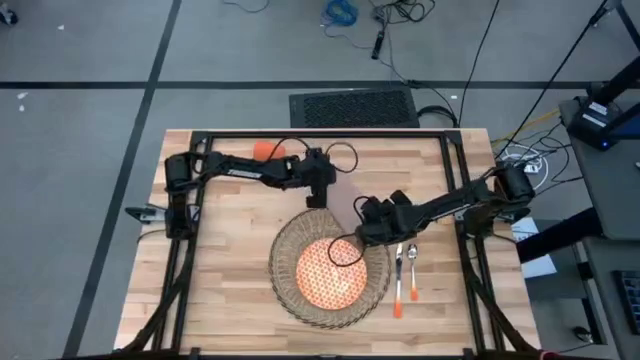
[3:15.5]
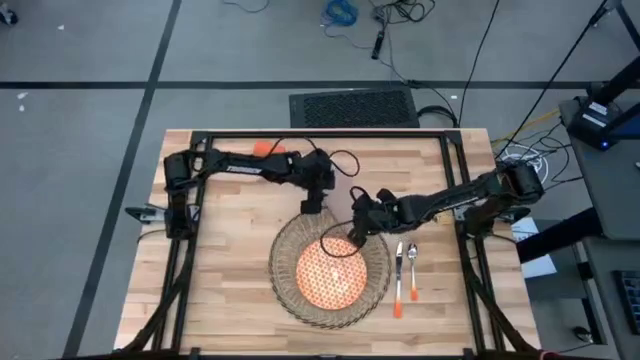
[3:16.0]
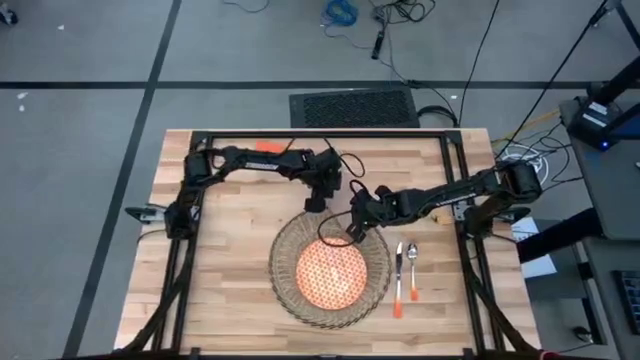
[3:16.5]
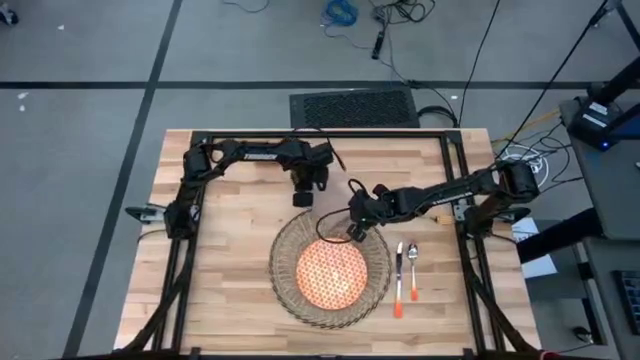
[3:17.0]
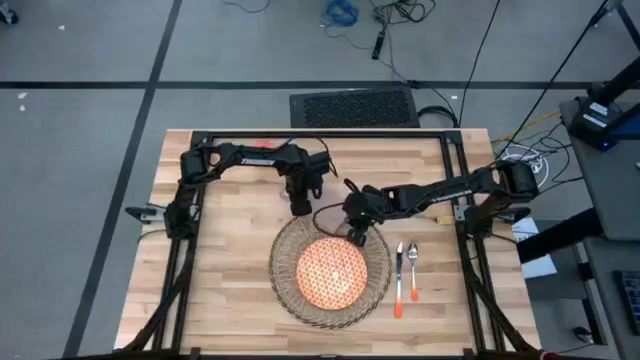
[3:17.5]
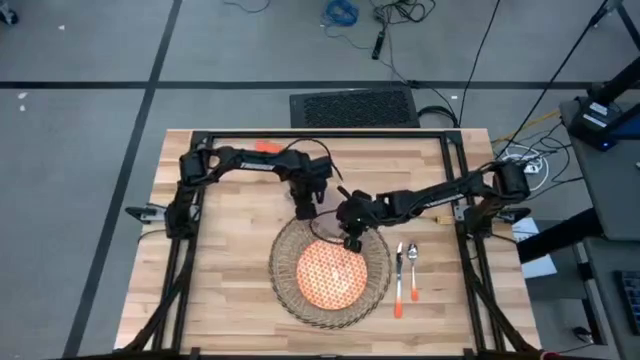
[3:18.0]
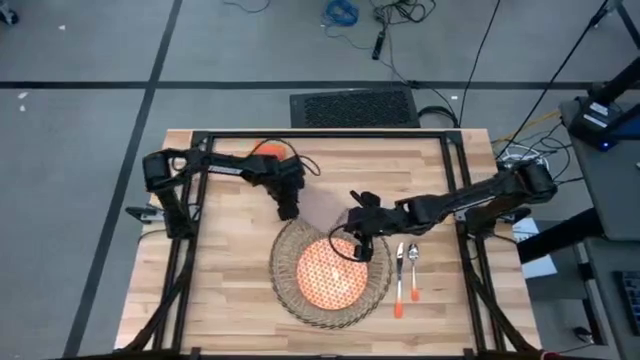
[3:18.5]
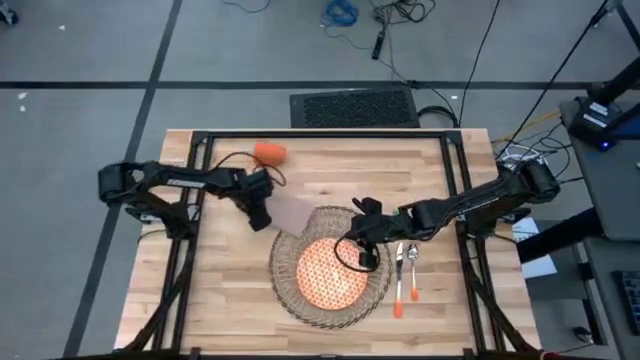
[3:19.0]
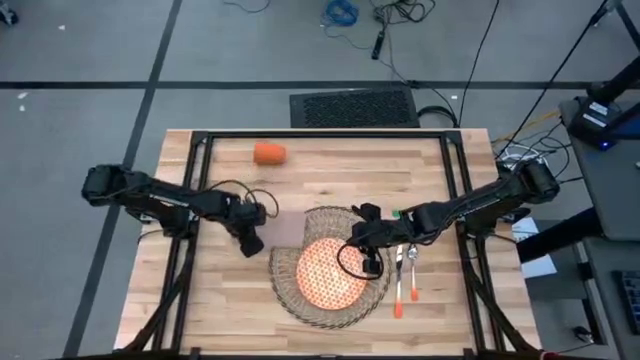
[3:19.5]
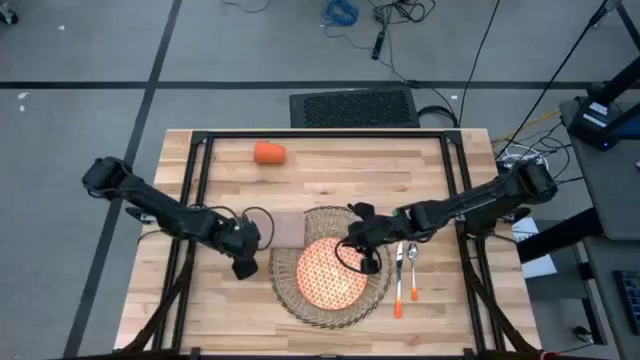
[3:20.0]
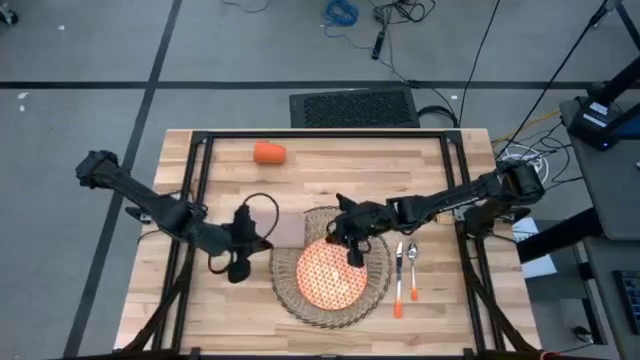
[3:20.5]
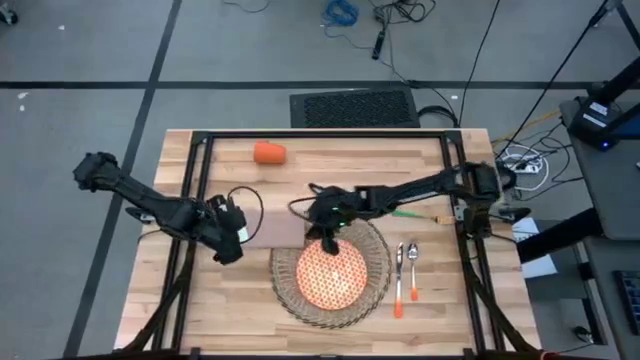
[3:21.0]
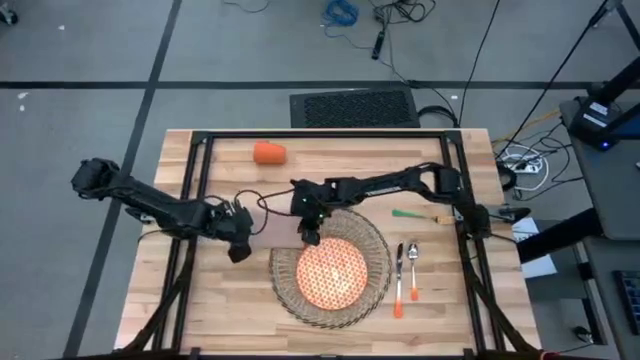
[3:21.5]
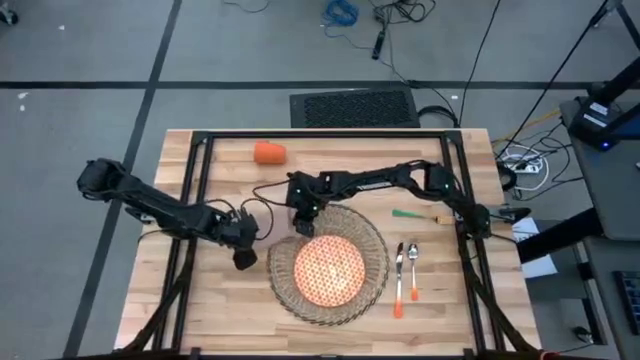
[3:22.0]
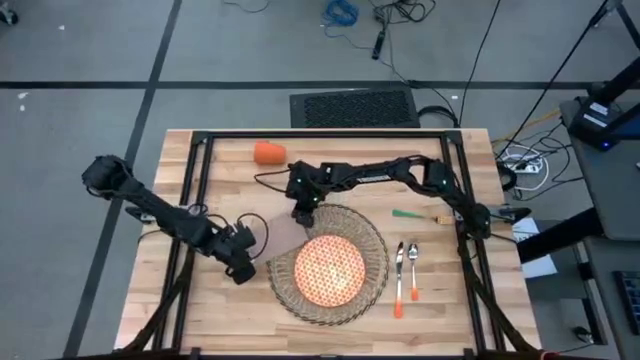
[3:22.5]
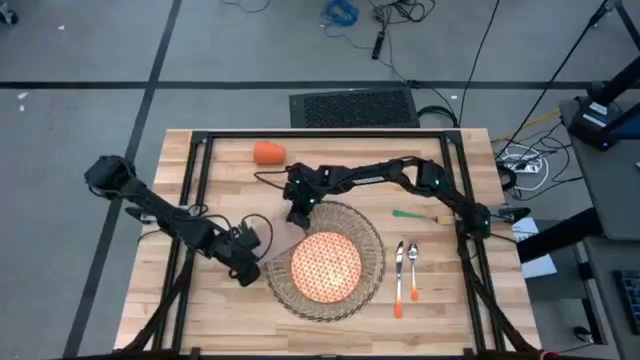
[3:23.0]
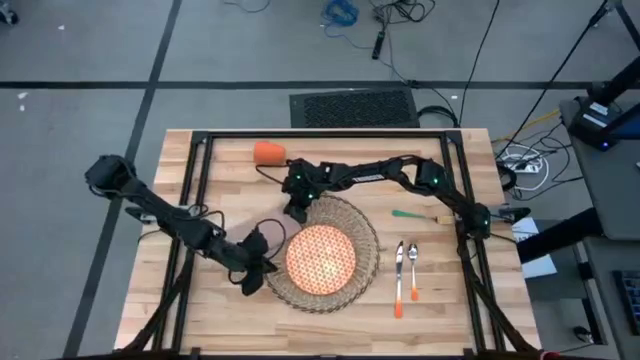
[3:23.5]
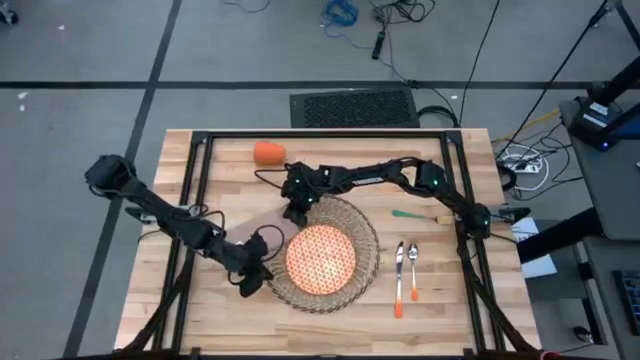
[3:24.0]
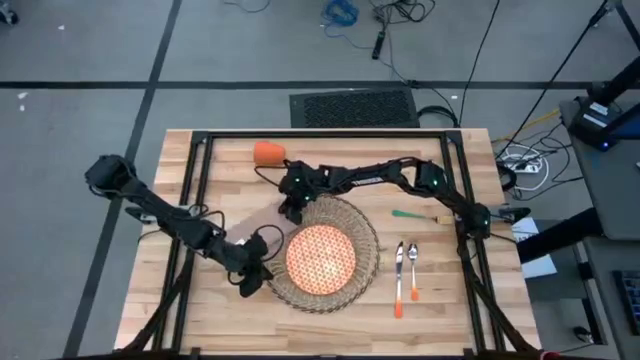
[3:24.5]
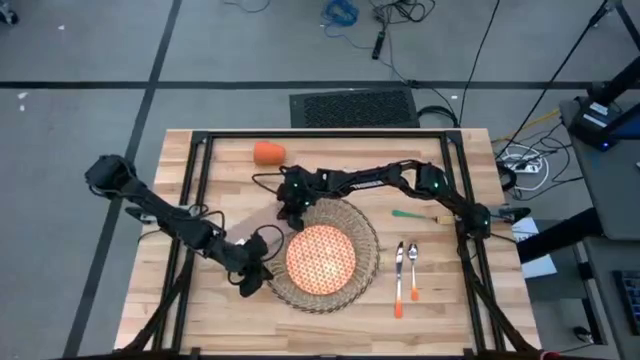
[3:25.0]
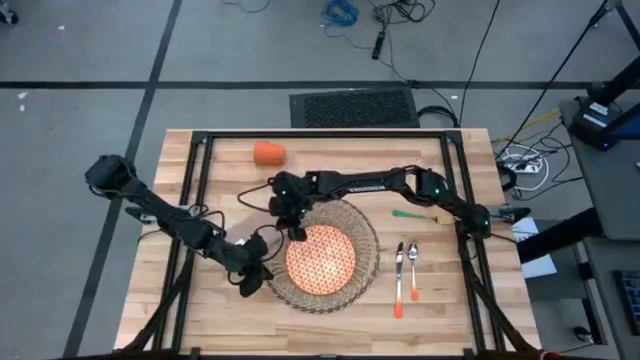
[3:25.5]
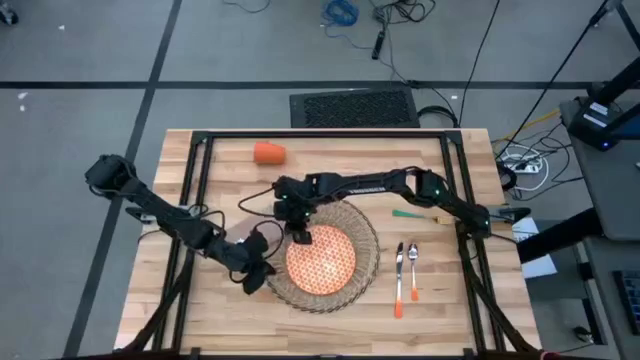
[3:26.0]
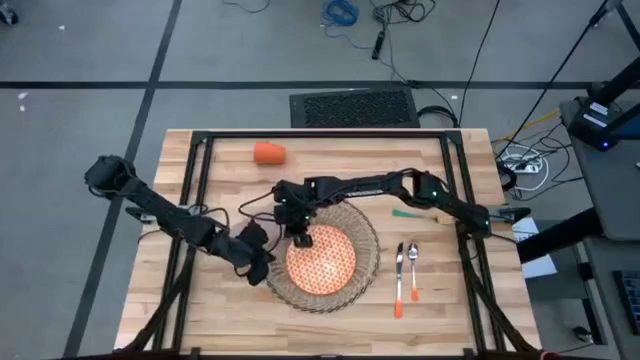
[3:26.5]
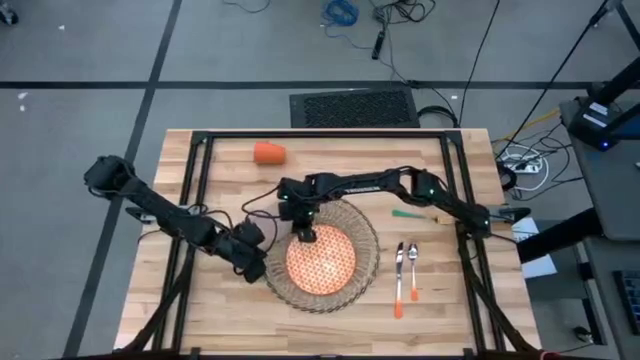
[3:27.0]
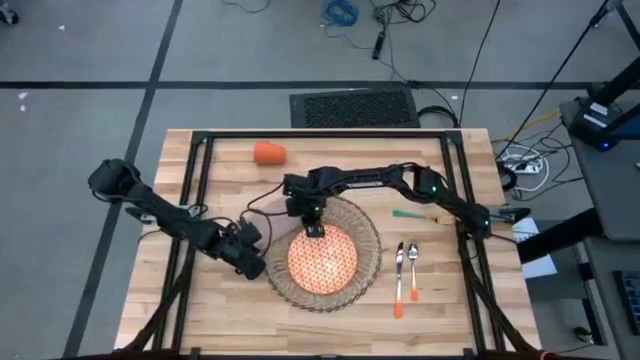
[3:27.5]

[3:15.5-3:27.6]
Task: Set table place
Put the white napkin on the table to the left of the brown mat

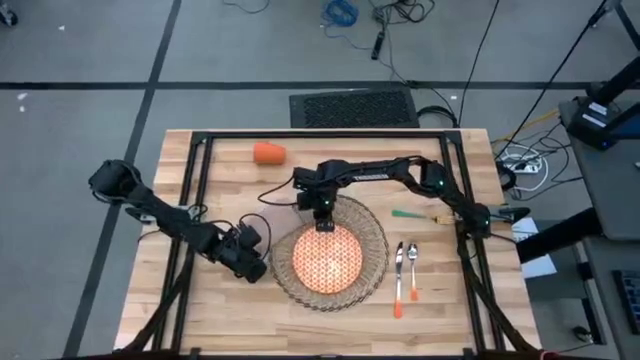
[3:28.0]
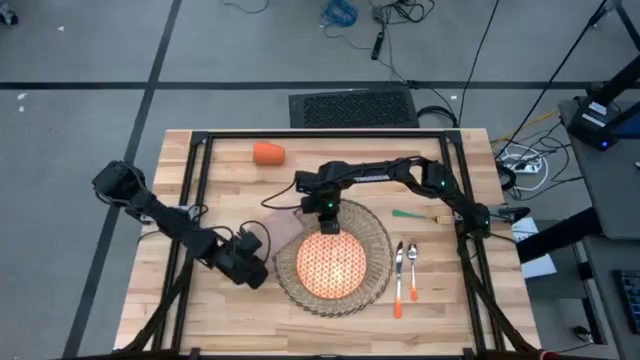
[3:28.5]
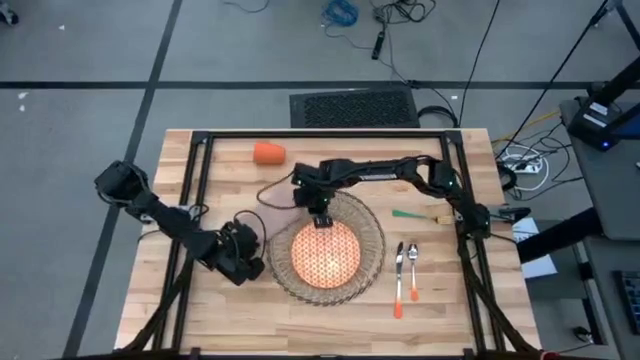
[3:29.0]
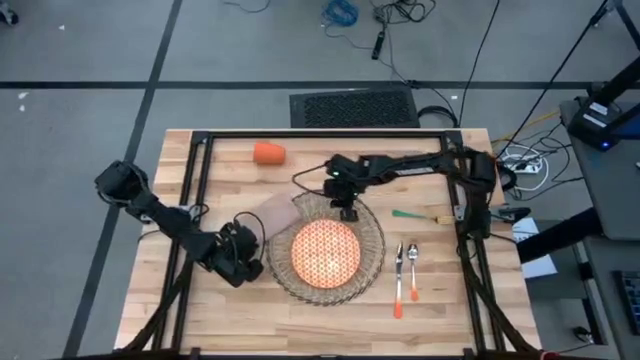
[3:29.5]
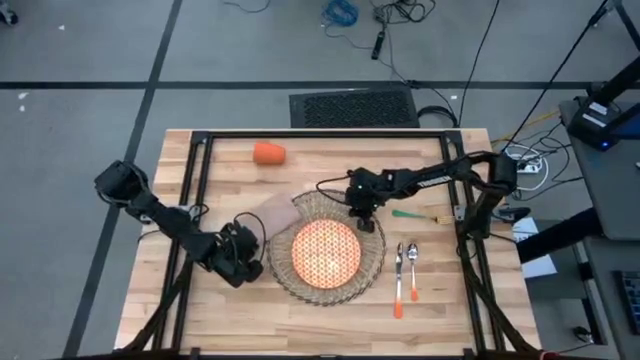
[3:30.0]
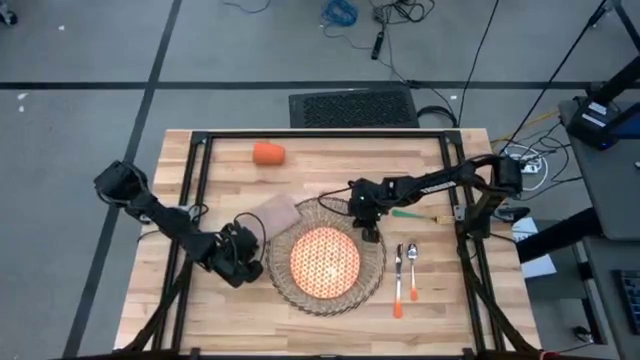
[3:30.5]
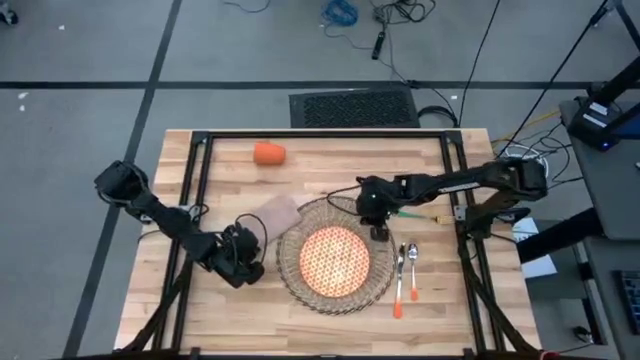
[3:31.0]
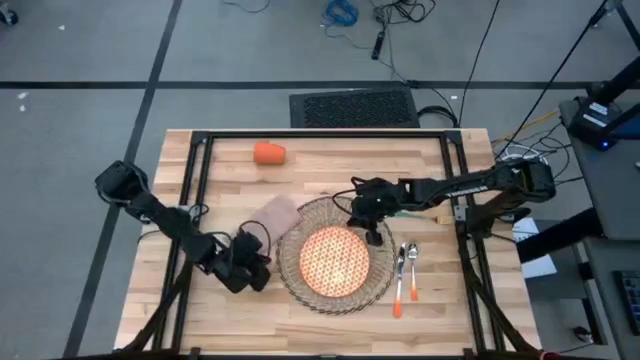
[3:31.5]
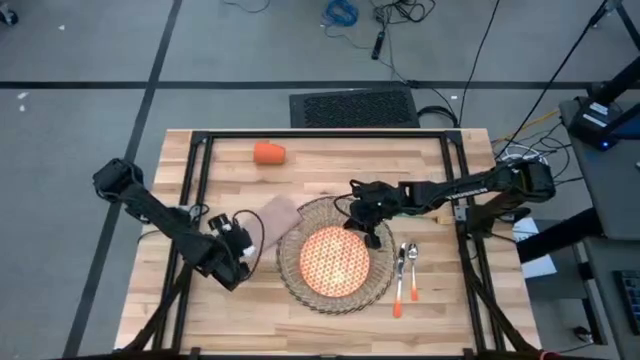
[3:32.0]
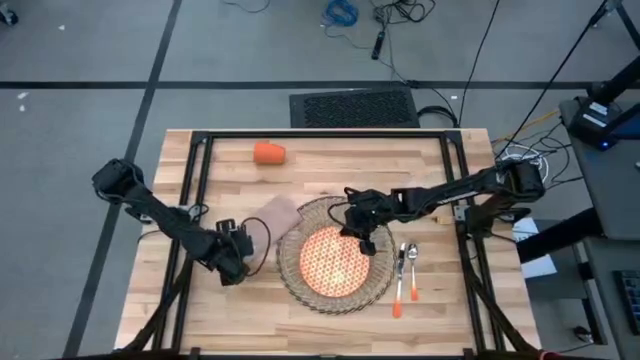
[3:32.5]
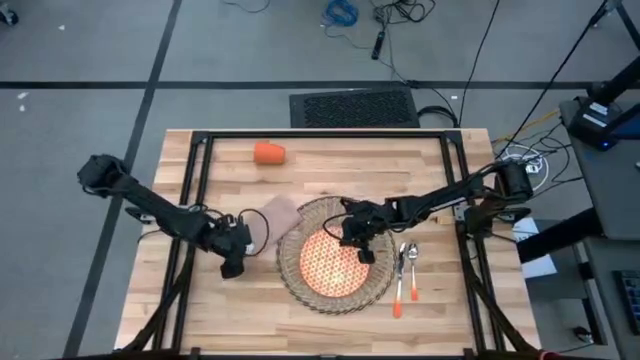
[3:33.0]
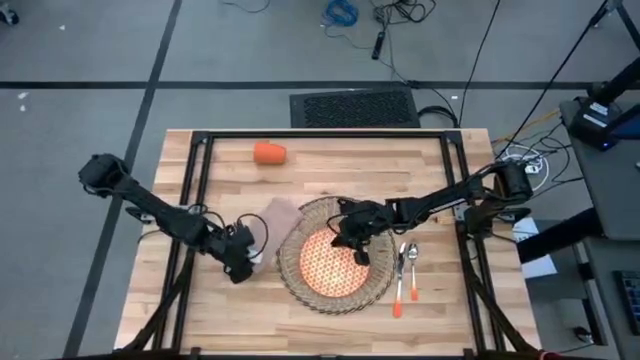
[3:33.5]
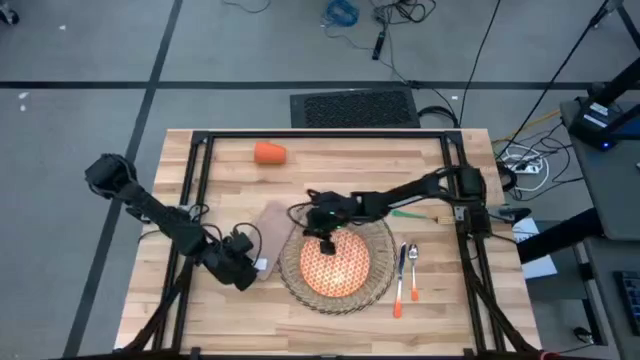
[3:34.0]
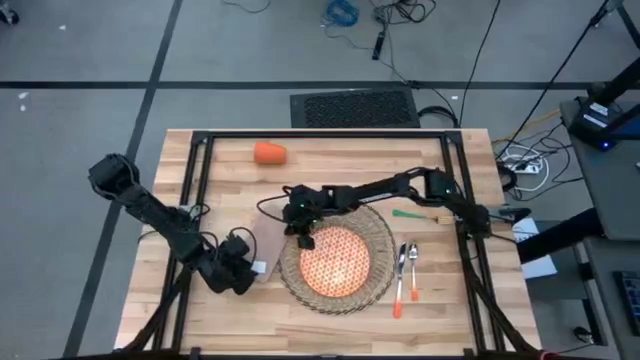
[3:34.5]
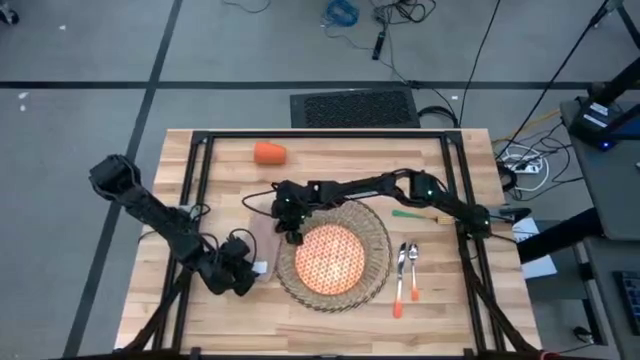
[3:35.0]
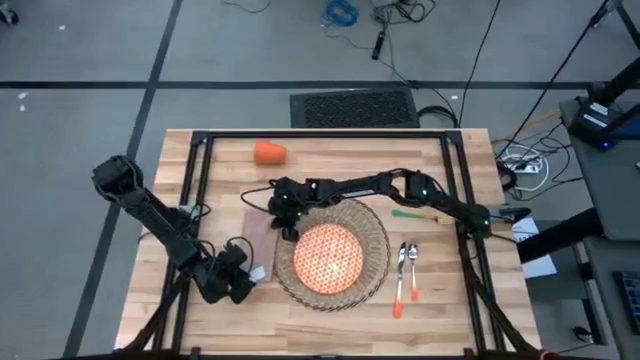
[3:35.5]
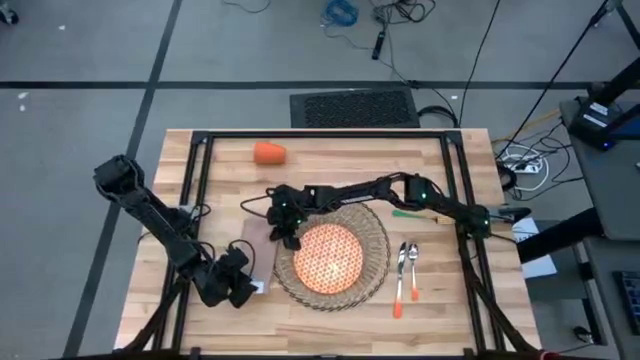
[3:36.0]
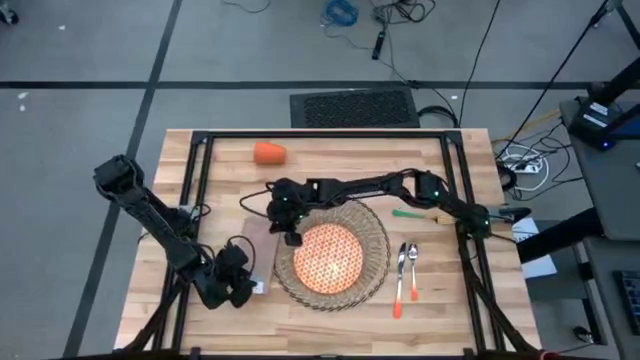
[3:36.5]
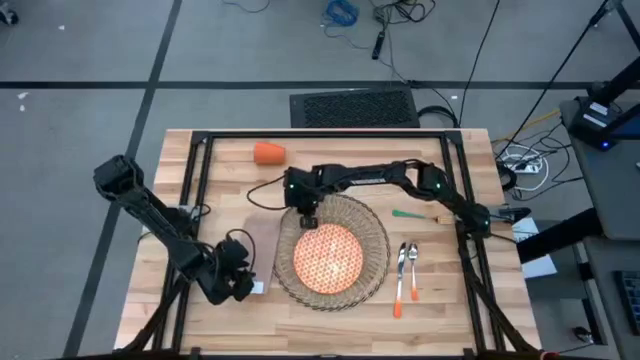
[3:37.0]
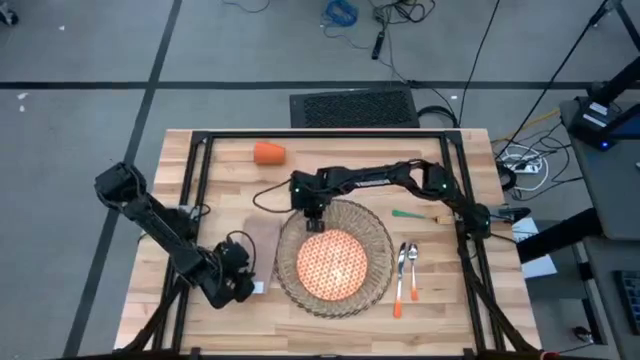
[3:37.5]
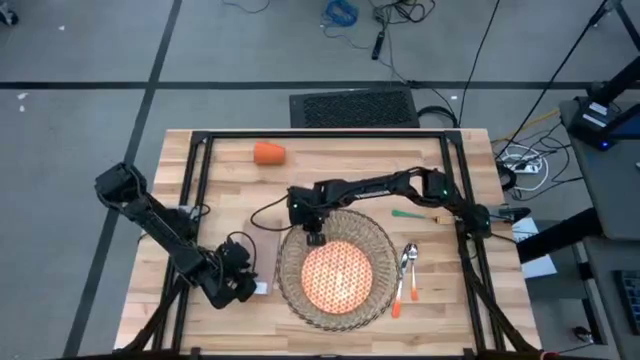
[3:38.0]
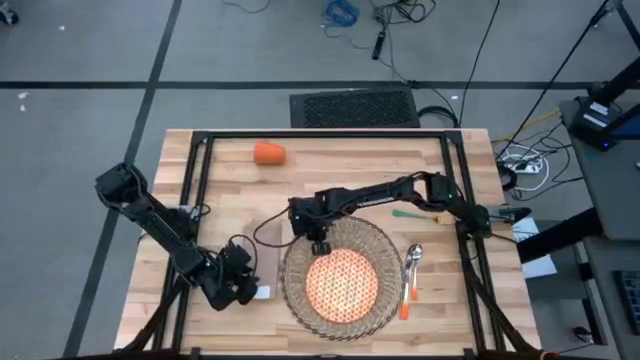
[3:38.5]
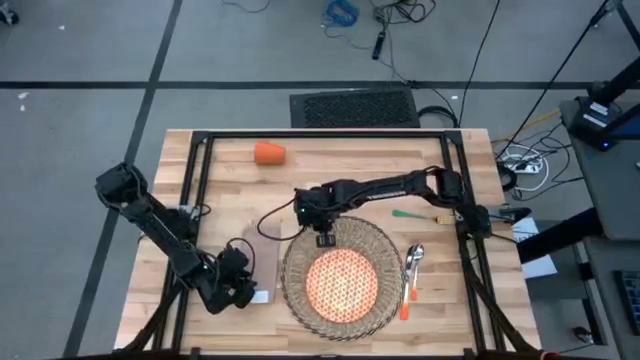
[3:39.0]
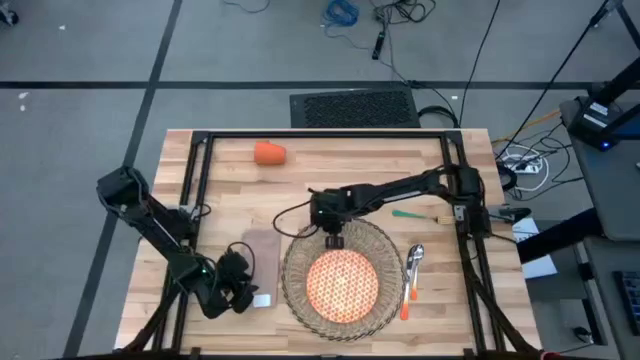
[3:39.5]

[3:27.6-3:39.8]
Put the white napkin on the table to the left of the brown mat
